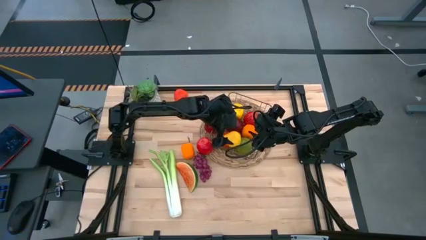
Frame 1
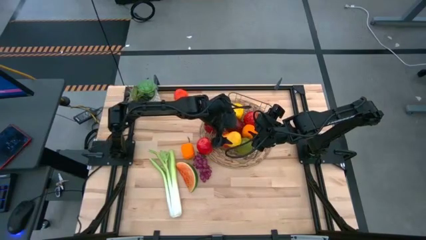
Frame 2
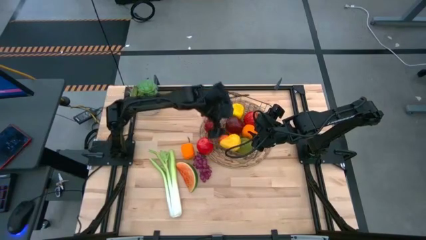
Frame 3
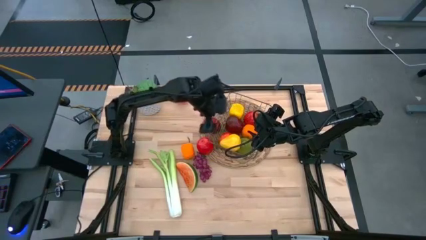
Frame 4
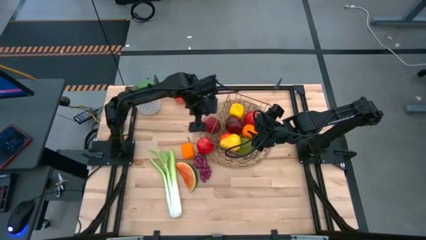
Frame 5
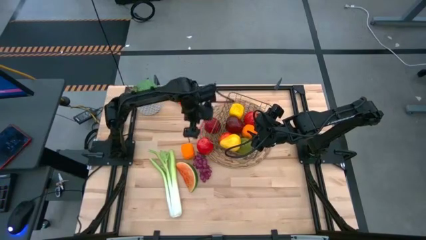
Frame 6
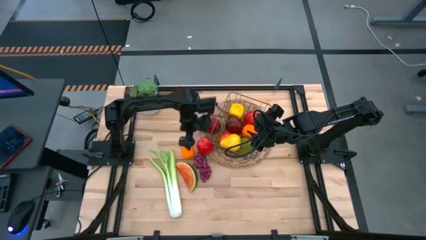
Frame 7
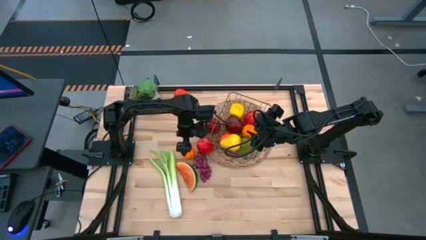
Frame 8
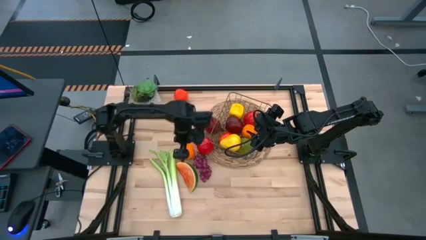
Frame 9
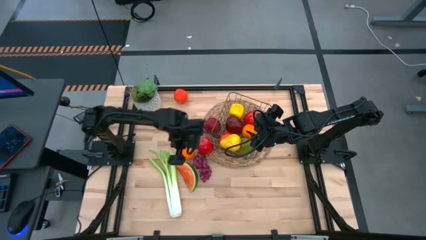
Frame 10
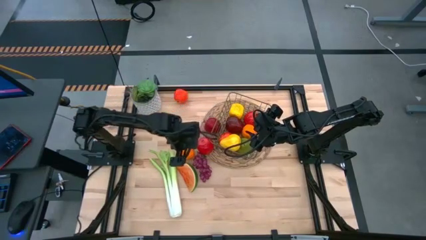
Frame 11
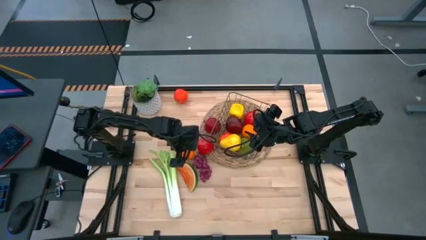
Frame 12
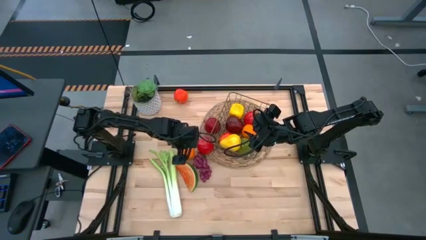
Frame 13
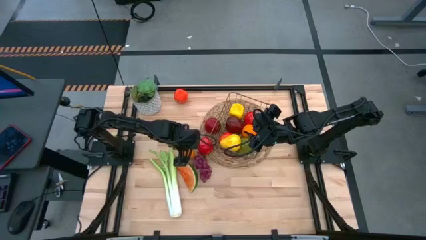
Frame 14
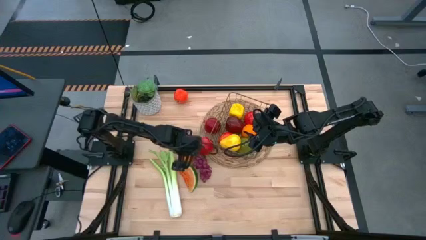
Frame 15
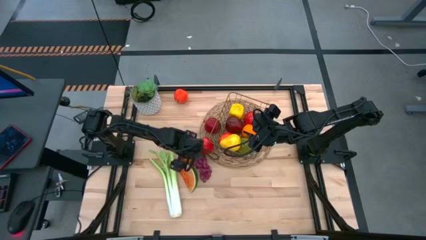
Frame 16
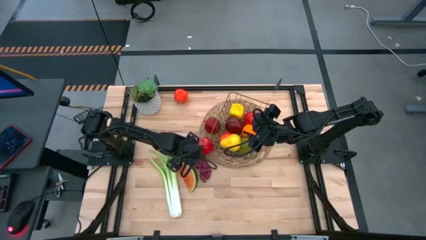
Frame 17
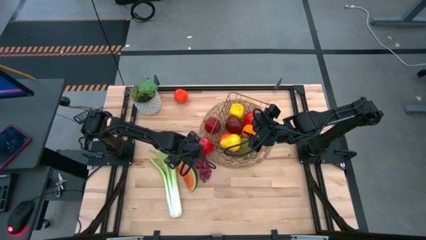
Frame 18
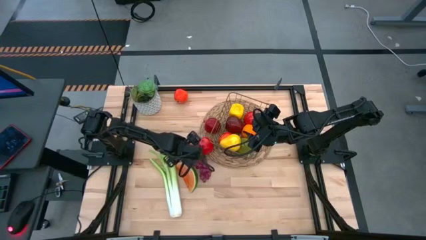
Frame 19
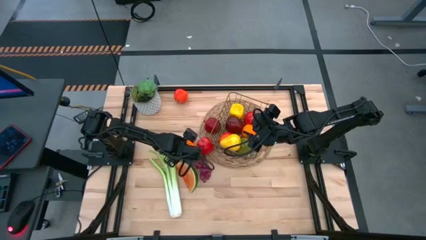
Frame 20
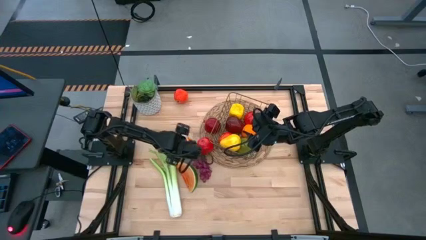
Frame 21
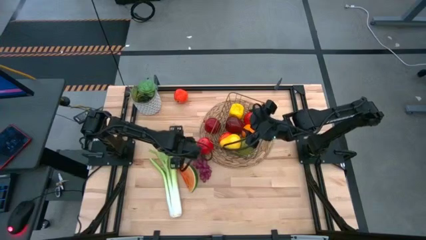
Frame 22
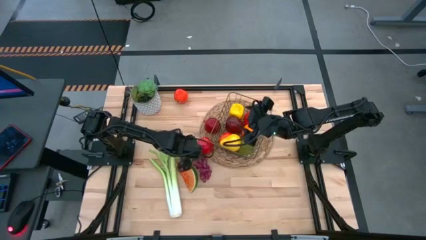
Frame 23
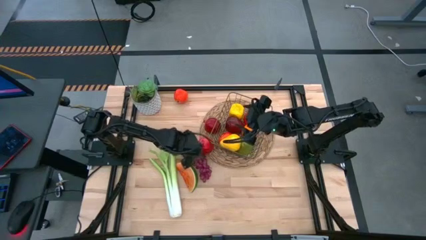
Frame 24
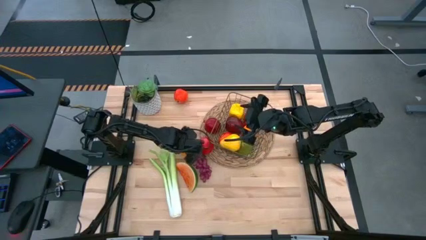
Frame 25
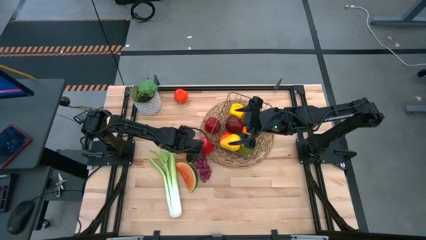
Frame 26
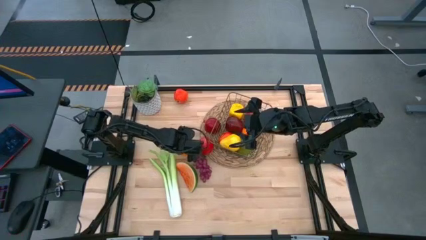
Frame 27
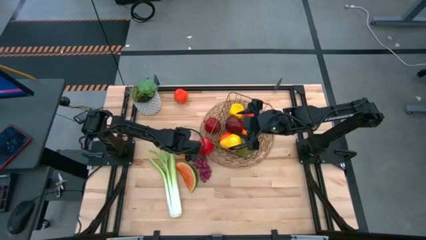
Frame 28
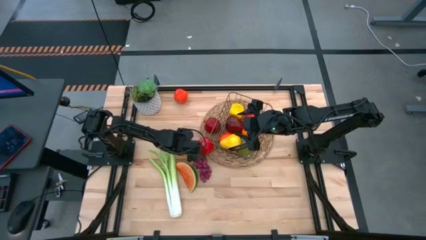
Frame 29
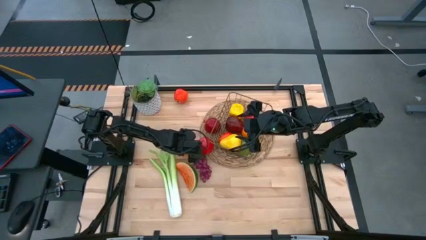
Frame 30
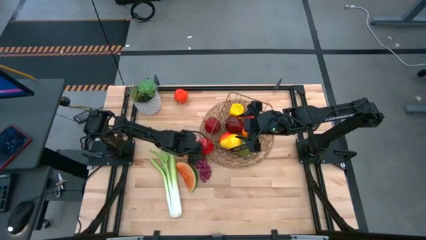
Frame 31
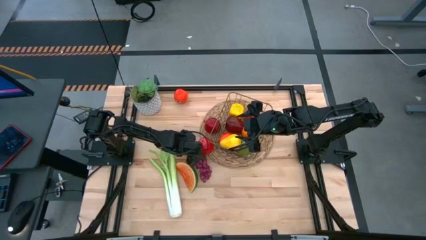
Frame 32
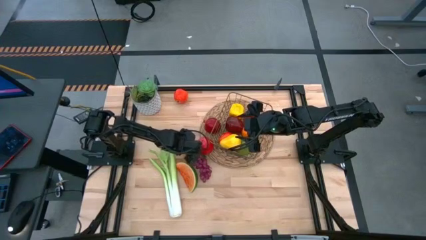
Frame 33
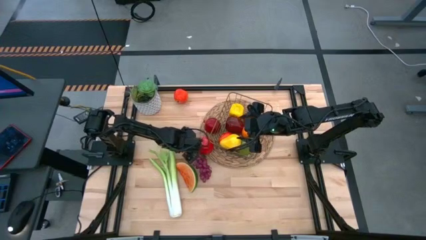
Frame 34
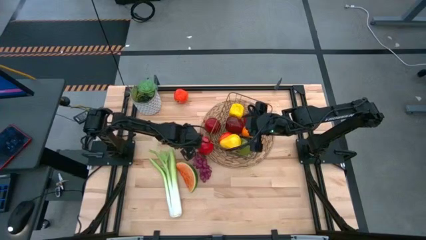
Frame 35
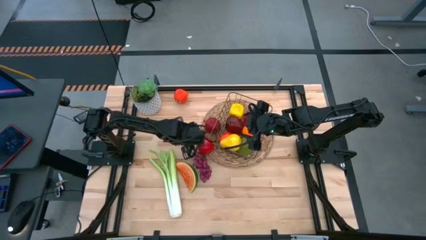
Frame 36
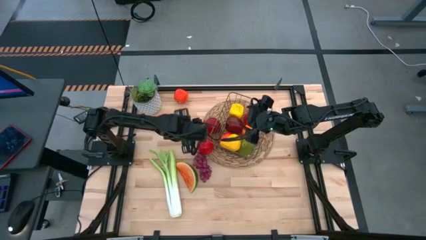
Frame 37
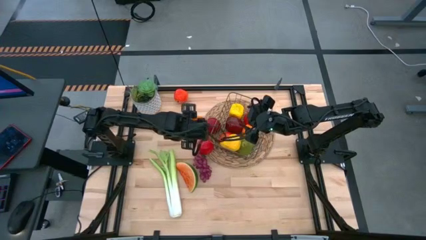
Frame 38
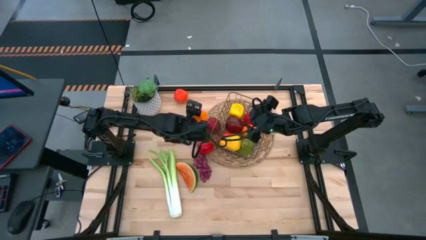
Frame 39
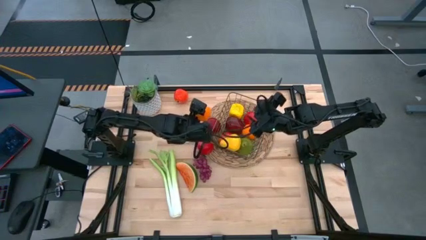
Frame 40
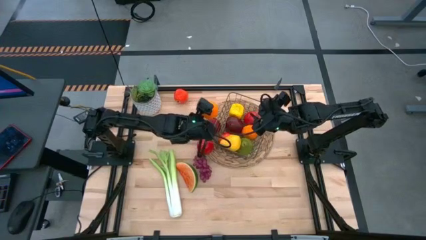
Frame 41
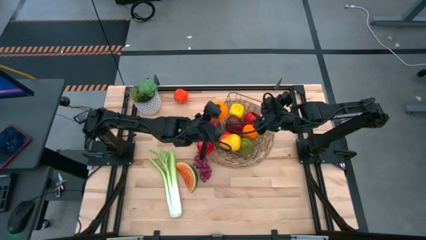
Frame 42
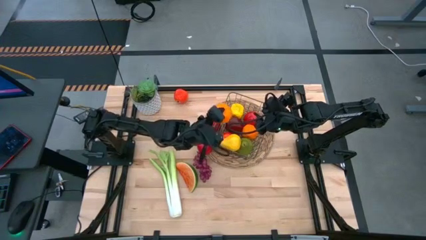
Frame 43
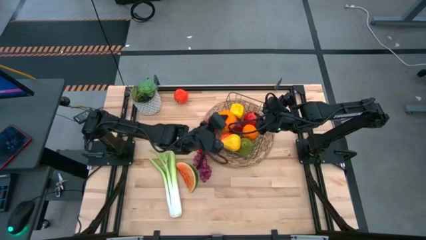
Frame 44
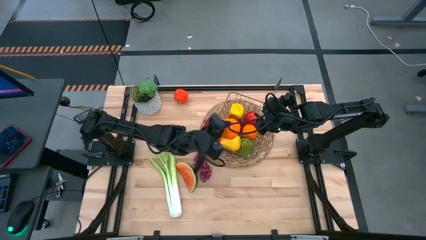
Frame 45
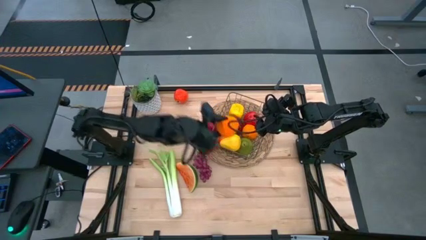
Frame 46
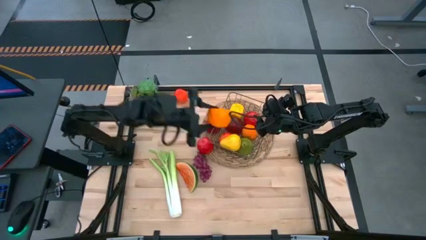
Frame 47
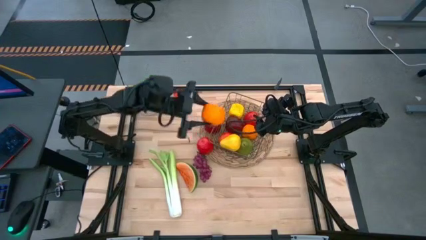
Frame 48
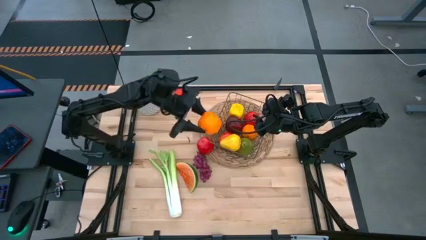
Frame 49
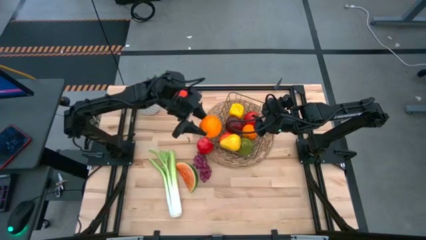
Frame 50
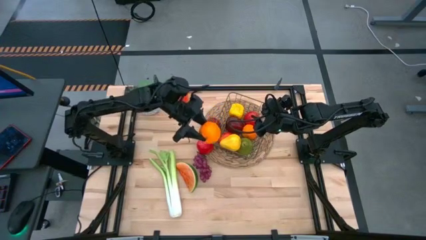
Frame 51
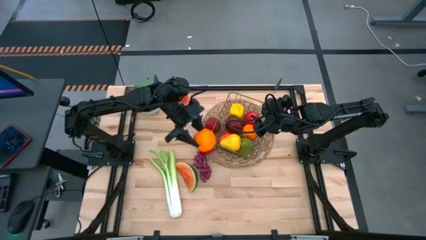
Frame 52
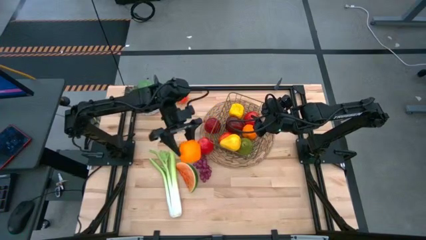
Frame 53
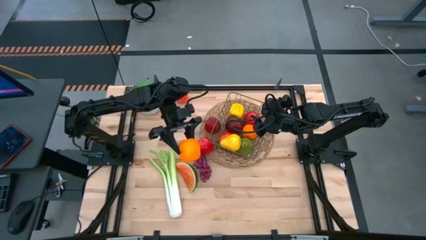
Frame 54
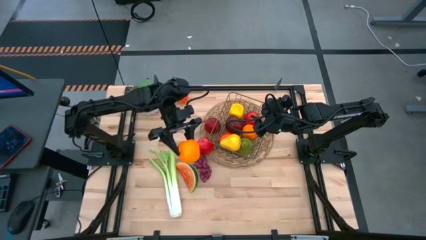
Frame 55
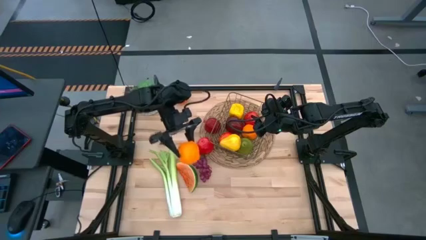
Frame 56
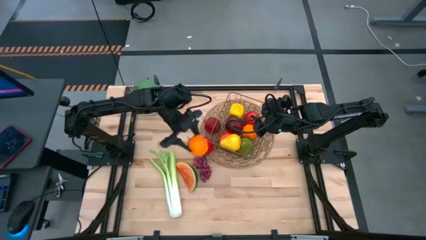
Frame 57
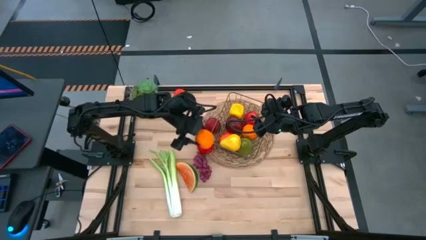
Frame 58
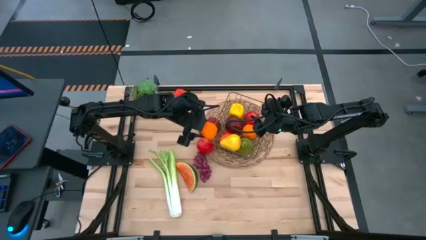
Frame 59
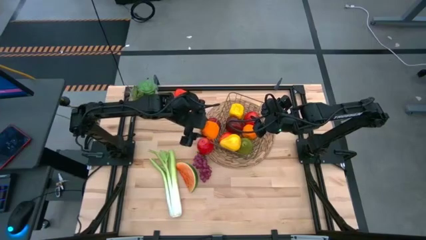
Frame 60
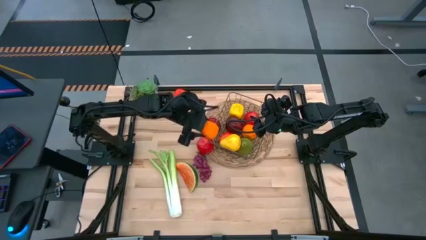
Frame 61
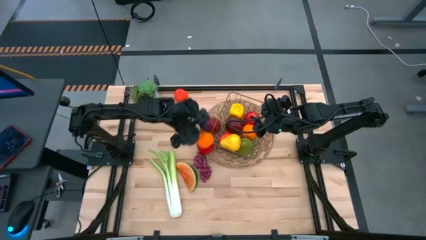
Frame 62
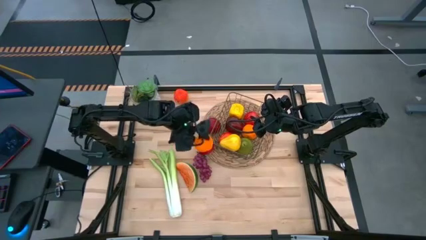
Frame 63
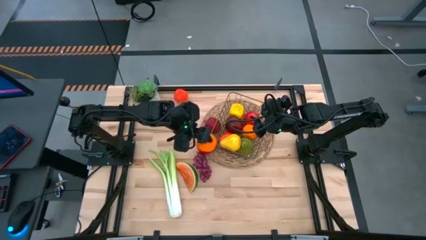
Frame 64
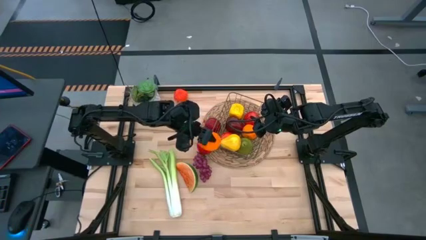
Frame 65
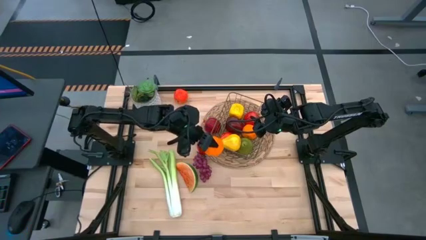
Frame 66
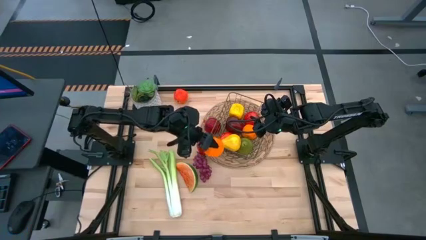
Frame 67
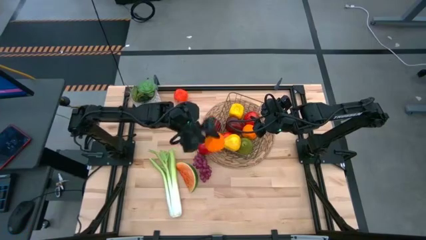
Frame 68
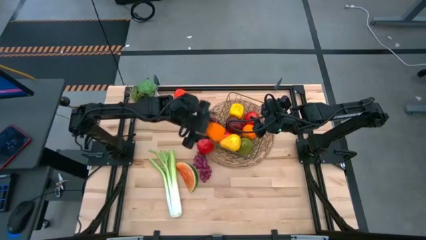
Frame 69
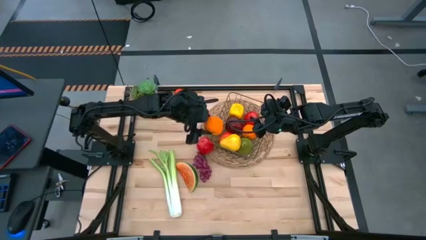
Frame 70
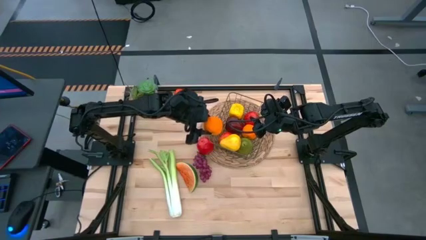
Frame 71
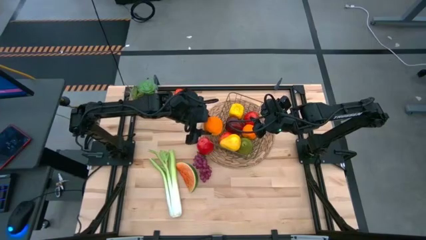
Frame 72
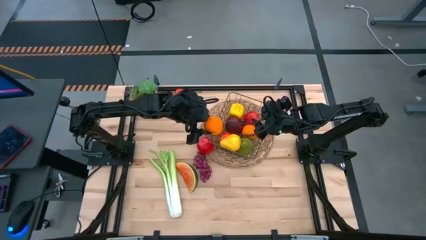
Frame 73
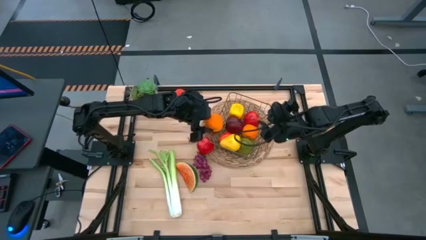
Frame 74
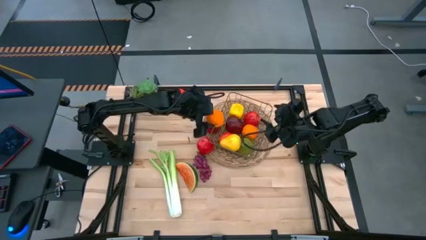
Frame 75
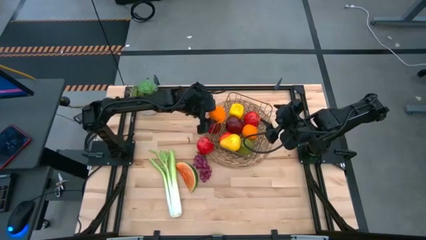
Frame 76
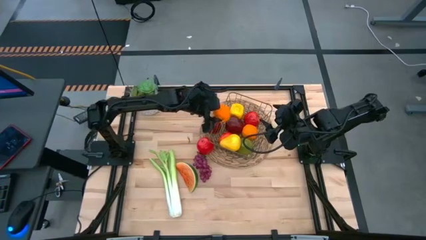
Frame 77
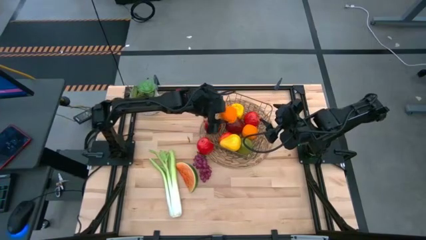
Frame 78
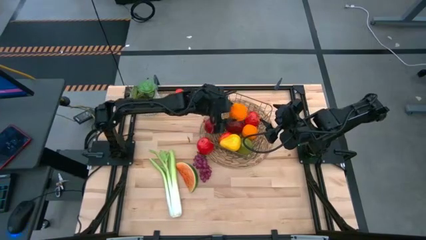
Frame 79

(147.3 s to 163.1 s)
Task: Build produce basket
Put the orange into the gold wire basket

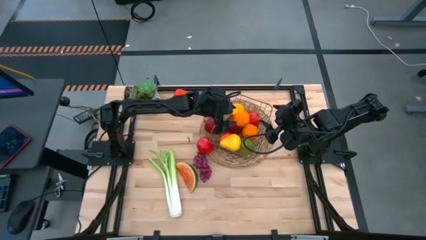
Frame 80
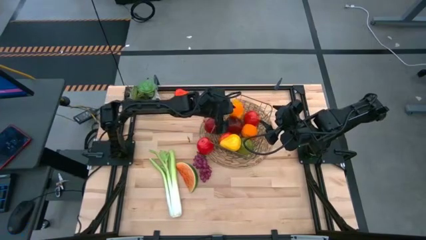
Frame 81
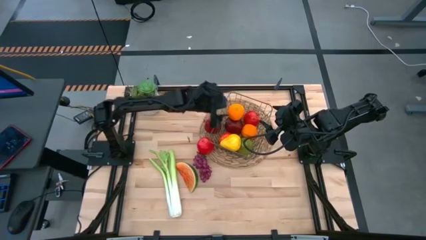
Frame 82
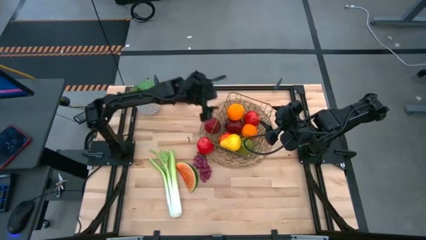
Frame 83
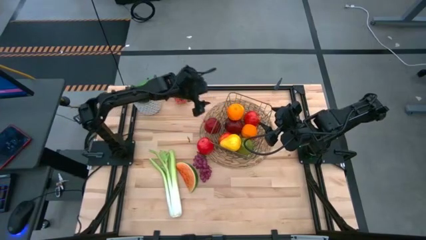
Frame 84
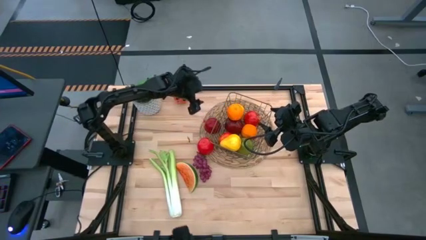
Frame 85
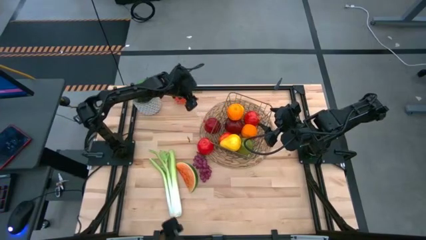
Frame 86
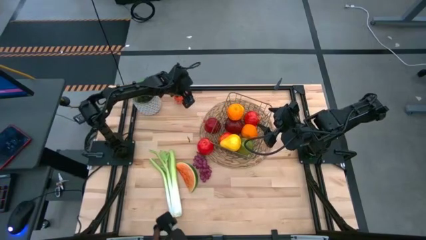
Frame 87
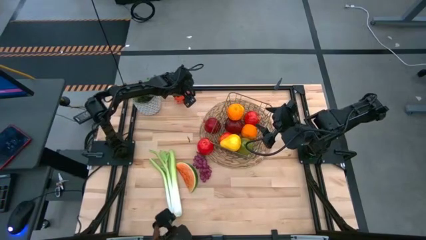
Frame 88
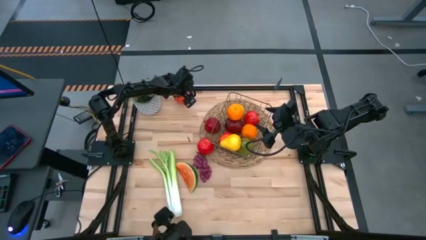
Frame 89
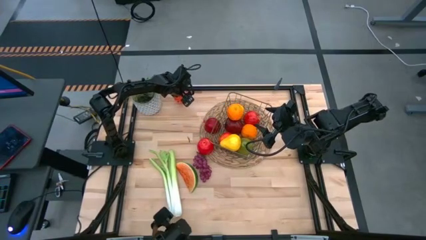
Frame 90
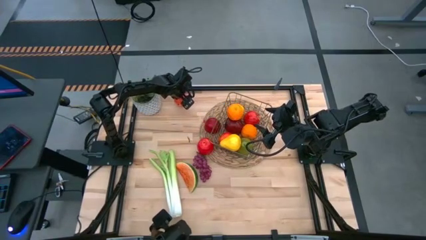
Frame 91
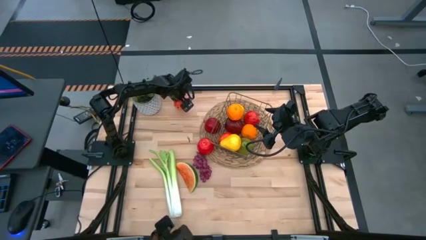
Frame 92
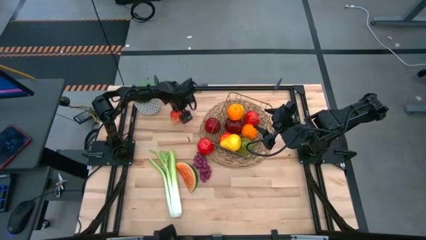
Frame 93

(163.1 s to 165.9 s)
Put the red apple into the gold wire basket
